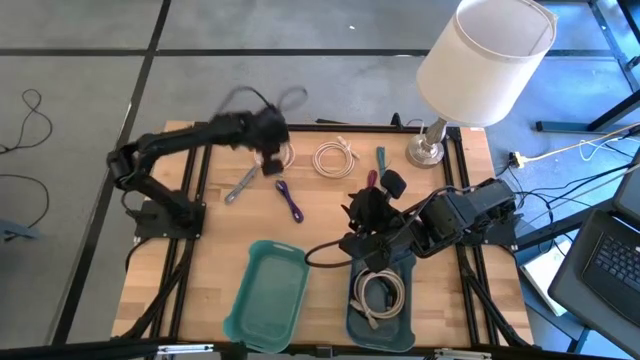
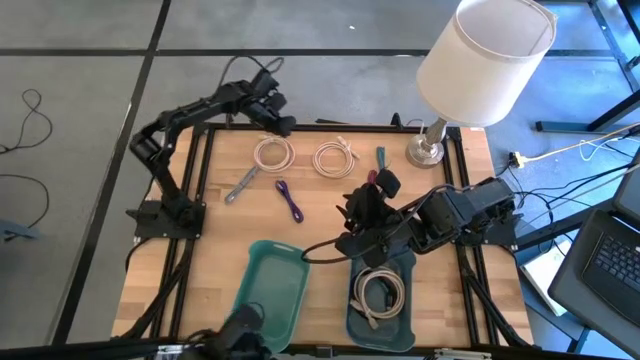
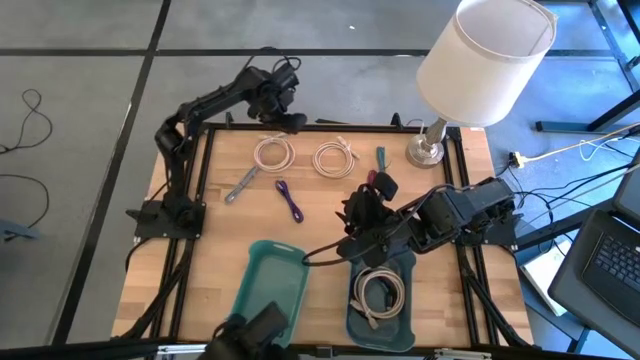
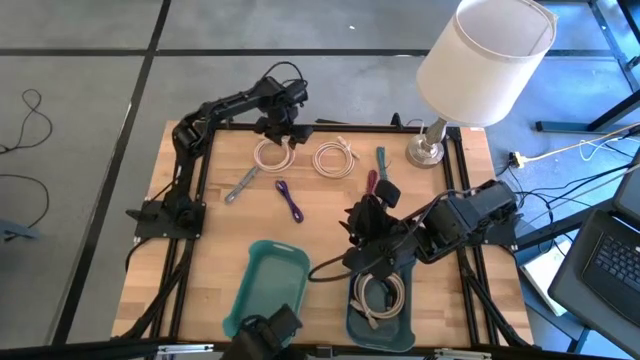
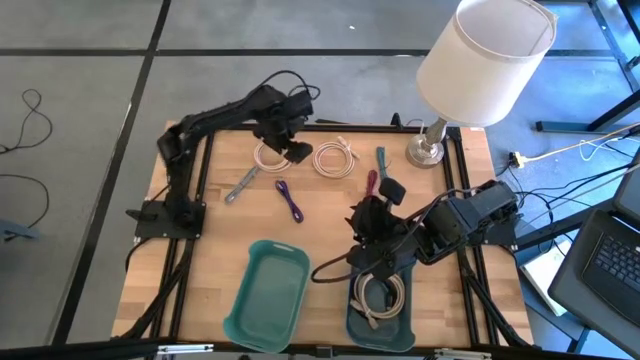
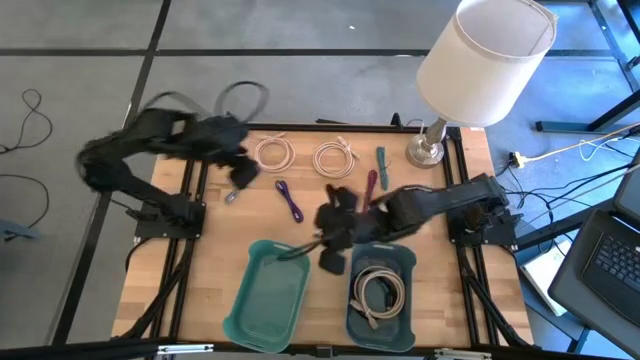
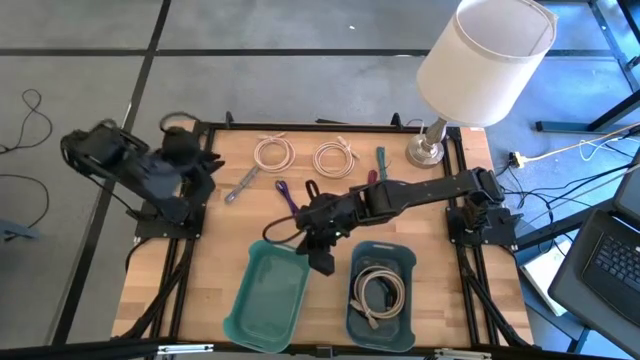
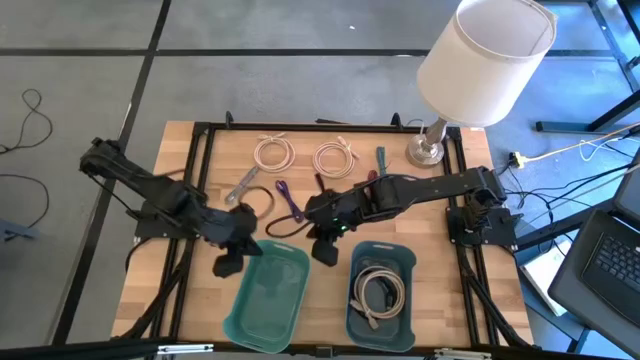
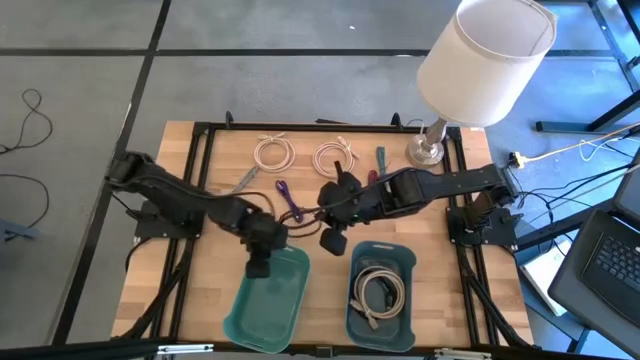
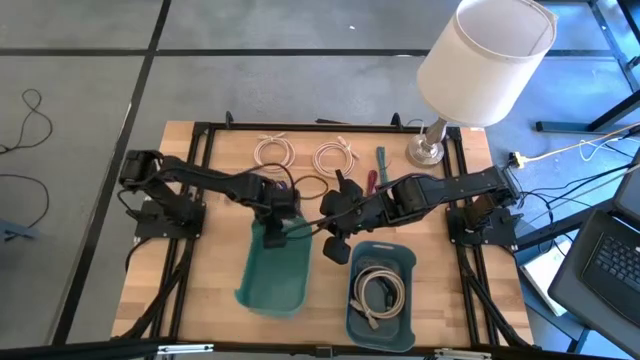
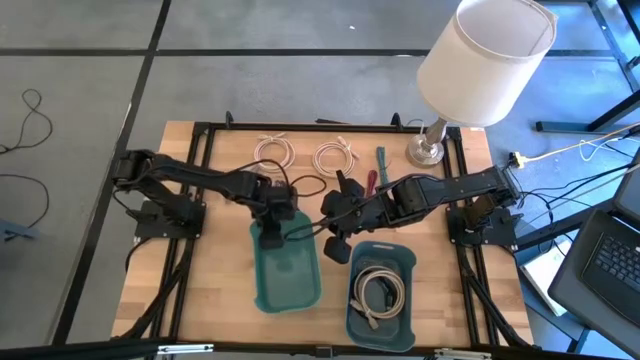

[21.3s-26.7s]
Task: Pick and place USB-C Cables
Adjust the green bin

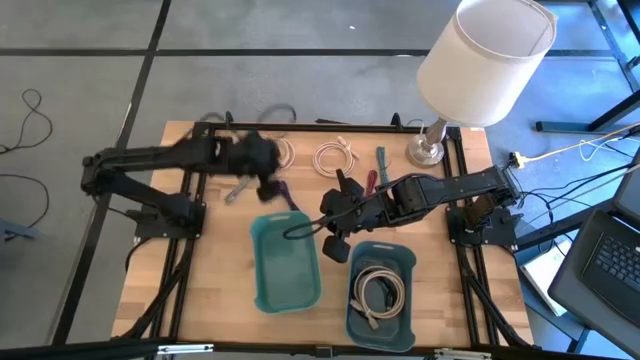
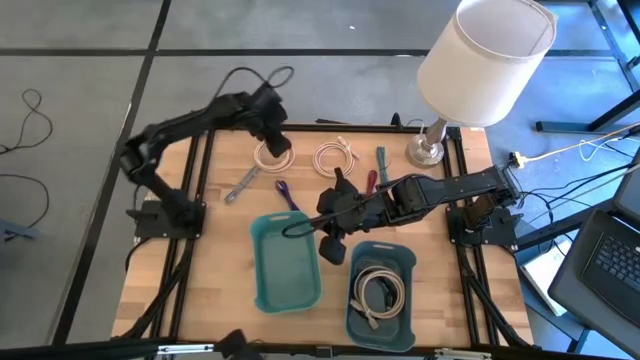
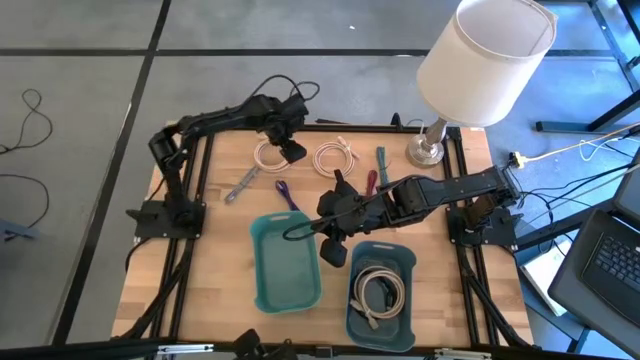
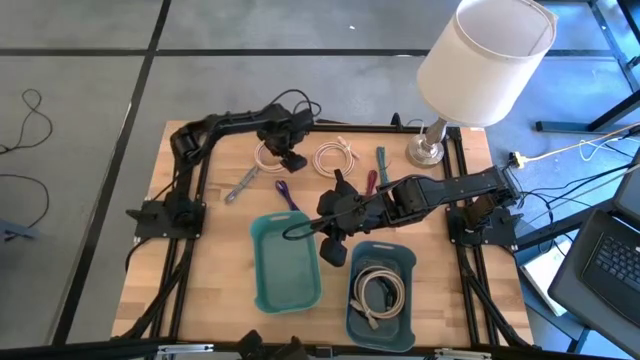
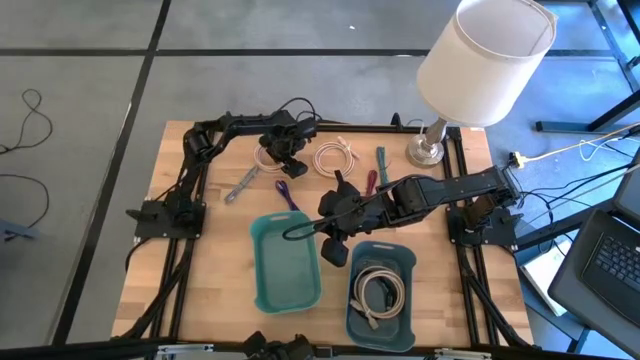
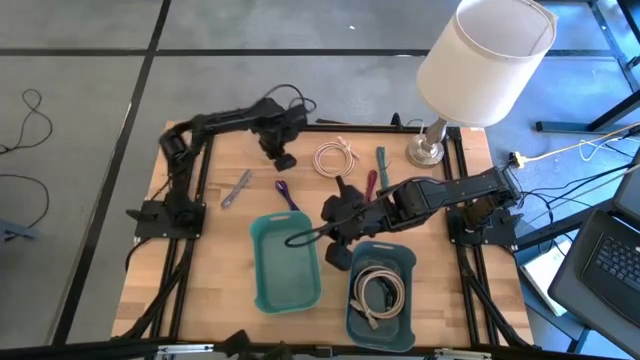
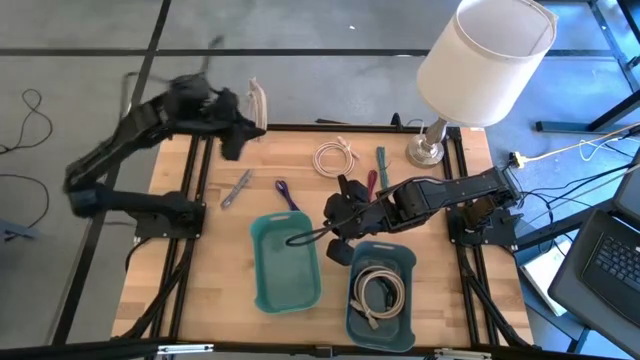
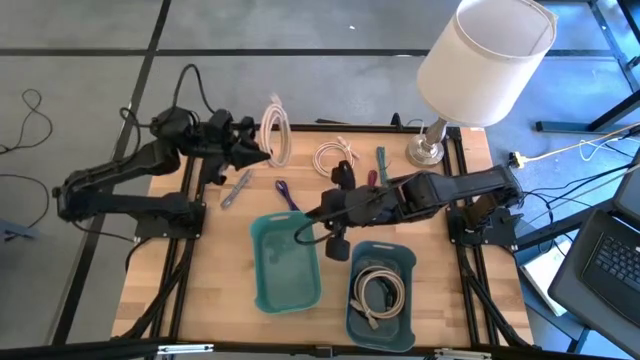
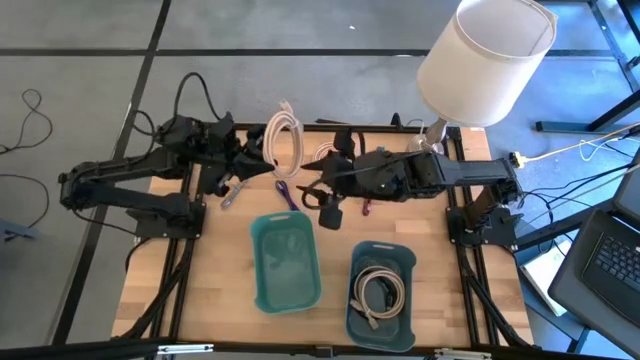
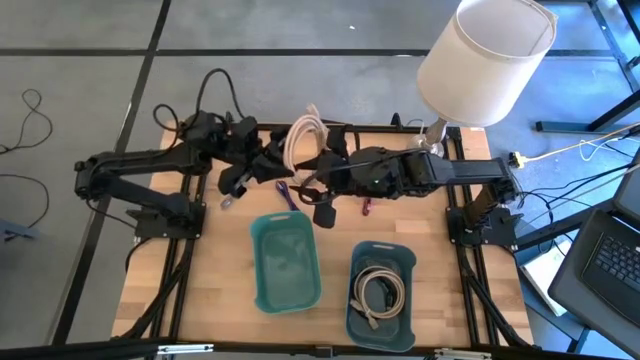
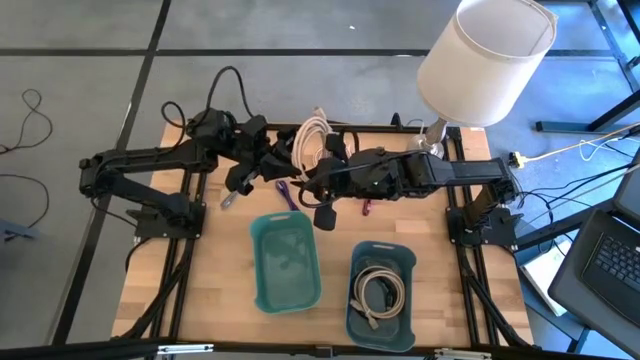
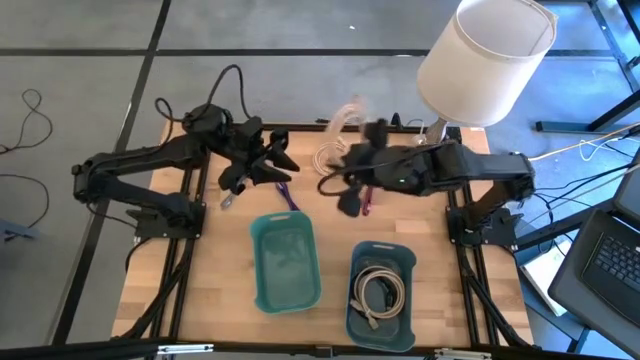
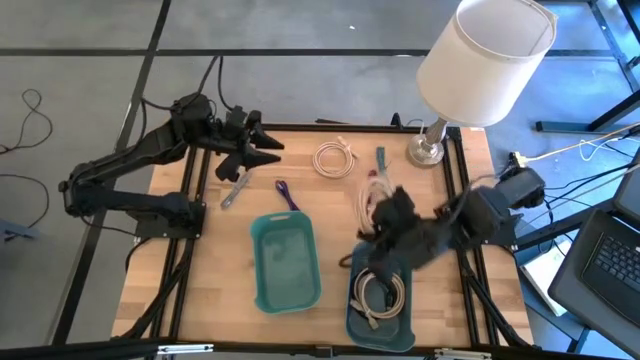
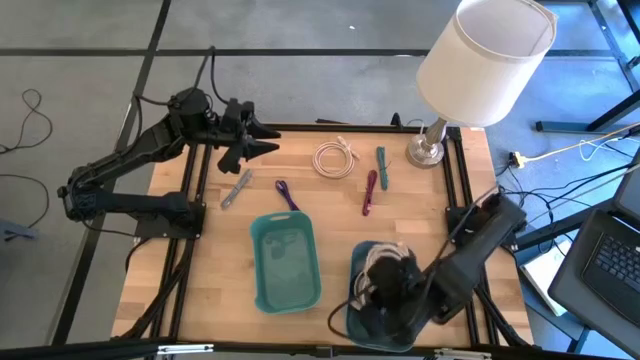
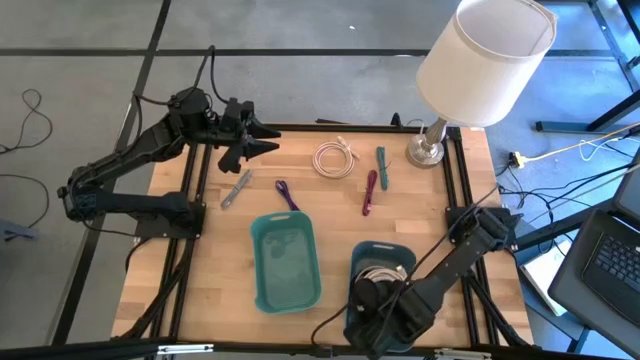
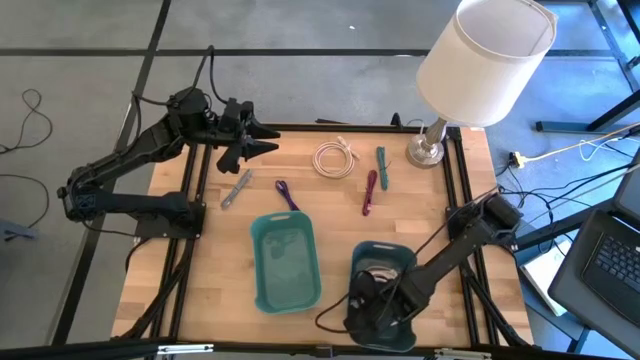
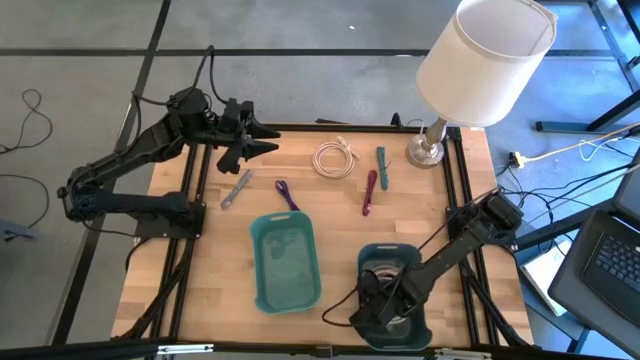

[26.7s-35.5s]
Put the left brown HDMI cable into the blue bin

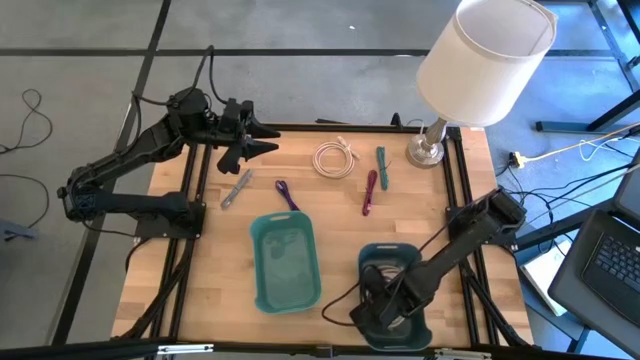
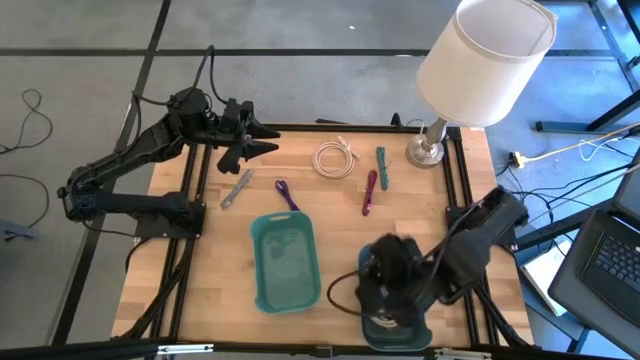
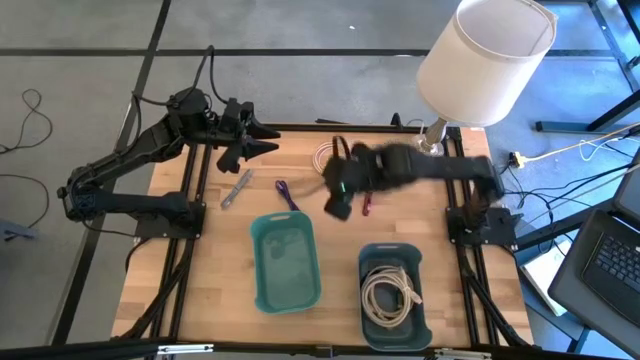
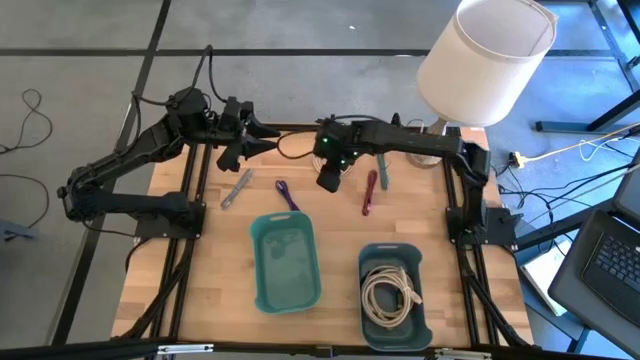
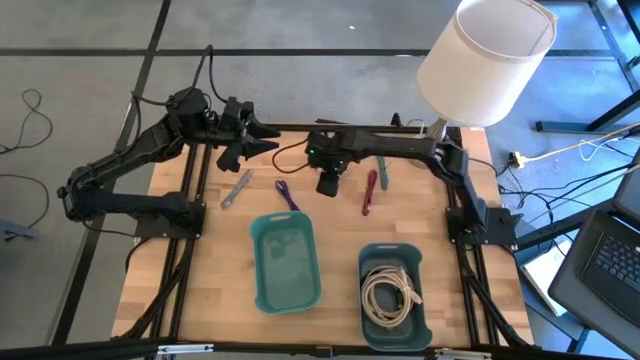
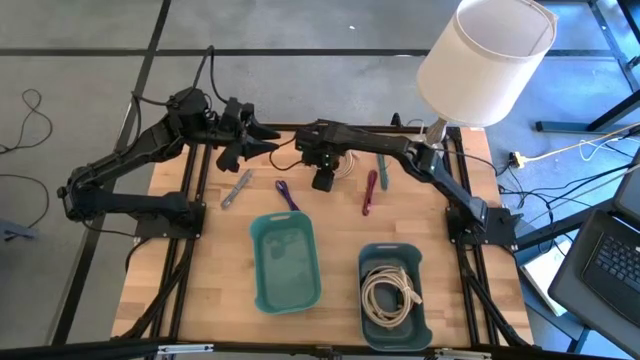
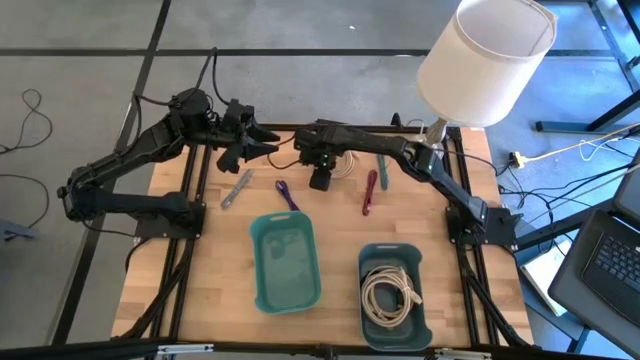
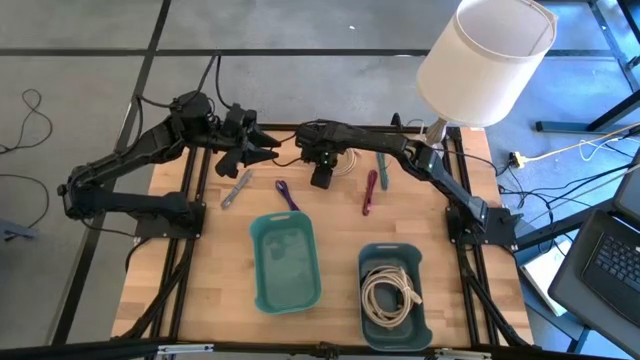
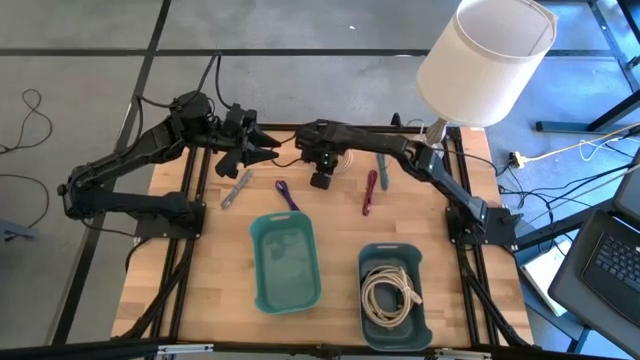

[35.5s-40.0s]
Put the brown HDMI cable into the blue bin

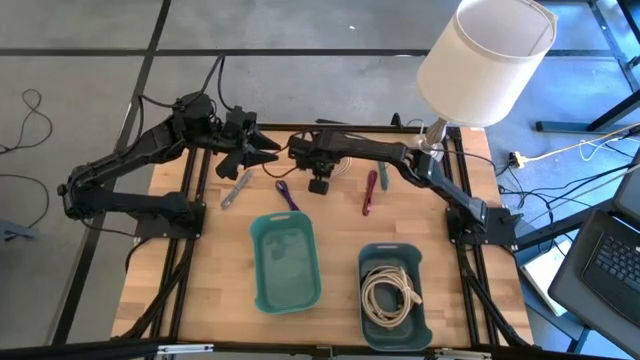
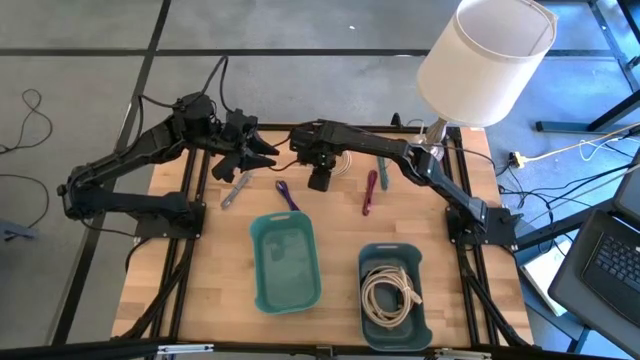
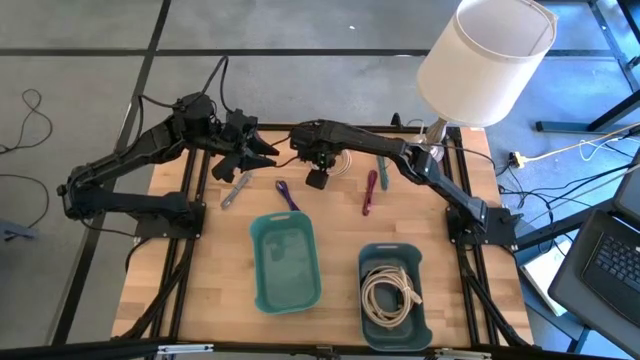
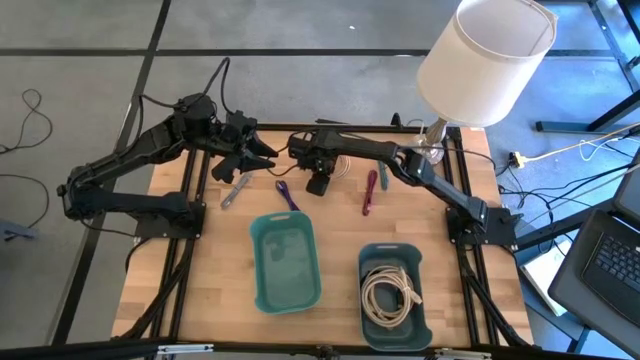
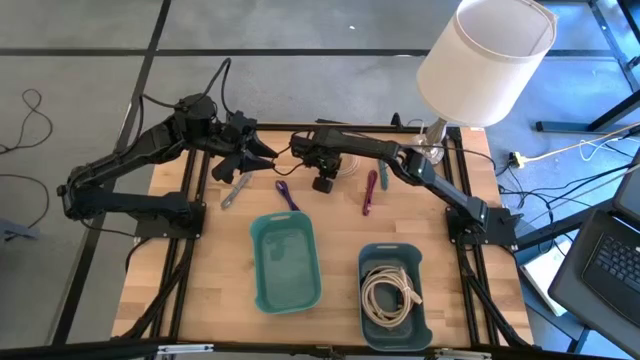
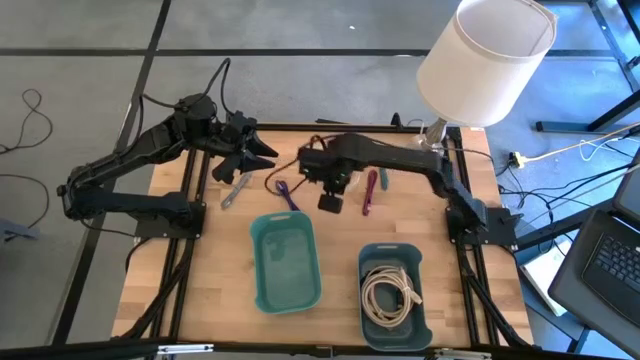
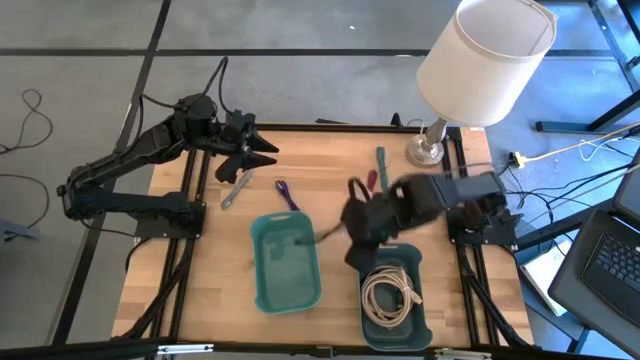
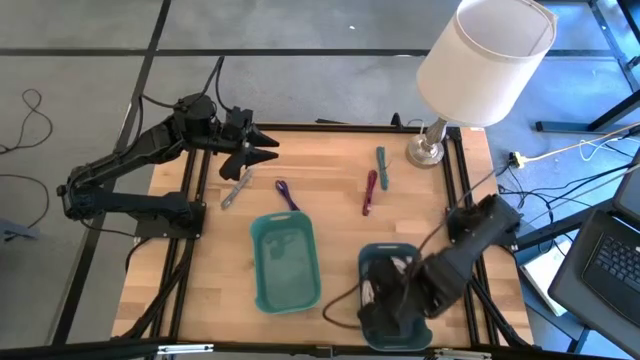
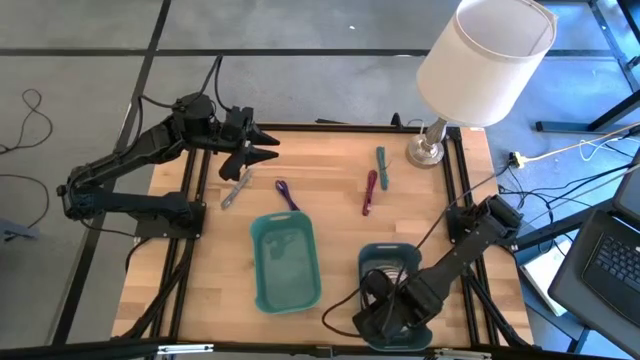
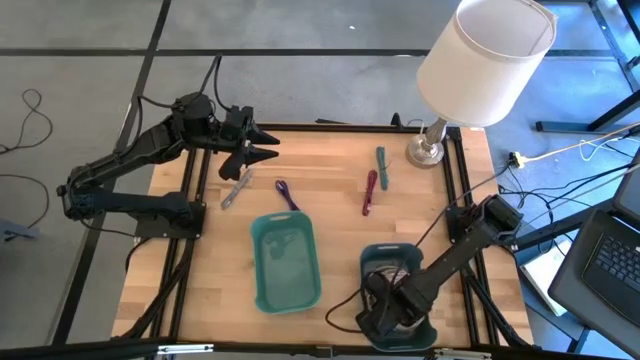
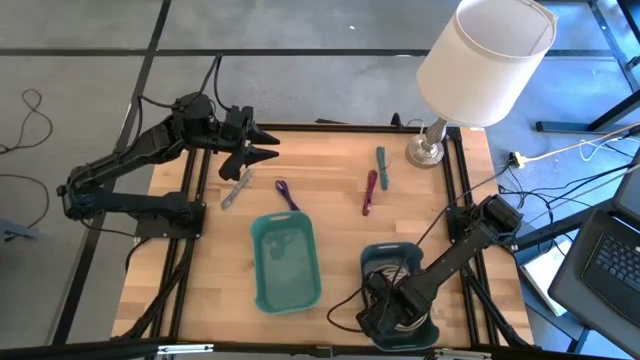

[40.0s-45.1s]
Put the brown large USB cable into the blue bin
